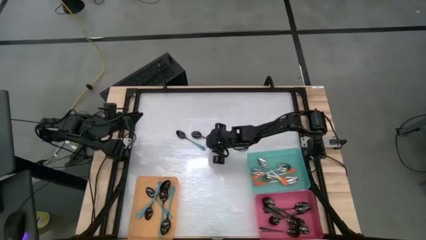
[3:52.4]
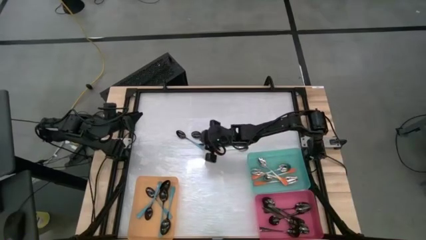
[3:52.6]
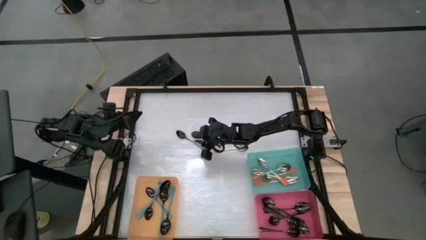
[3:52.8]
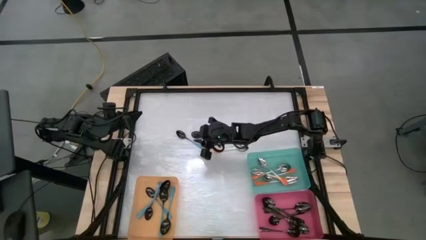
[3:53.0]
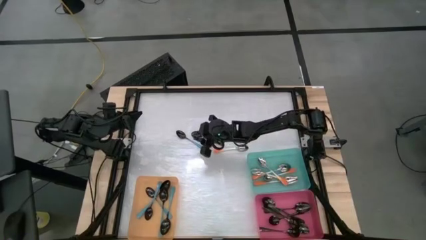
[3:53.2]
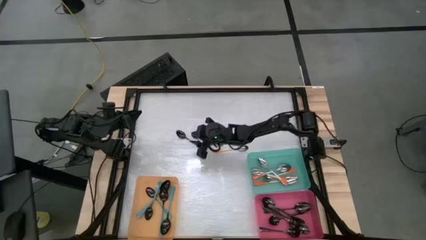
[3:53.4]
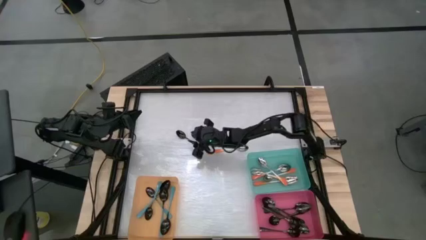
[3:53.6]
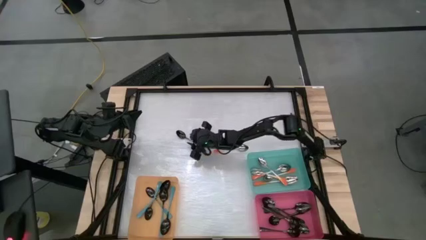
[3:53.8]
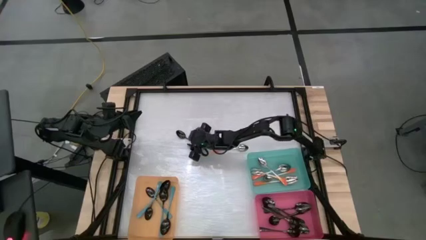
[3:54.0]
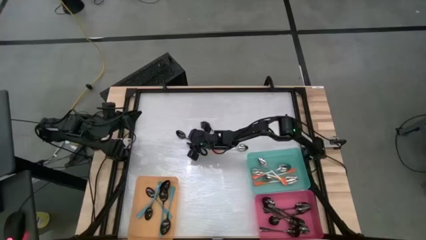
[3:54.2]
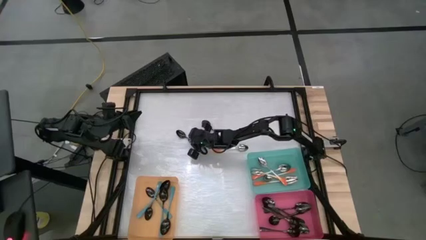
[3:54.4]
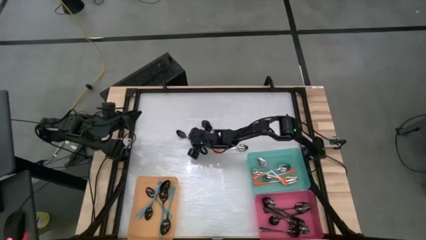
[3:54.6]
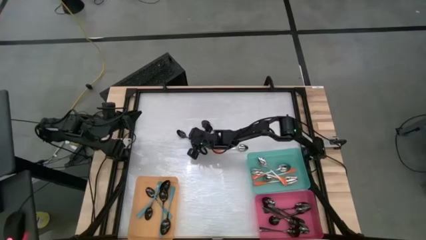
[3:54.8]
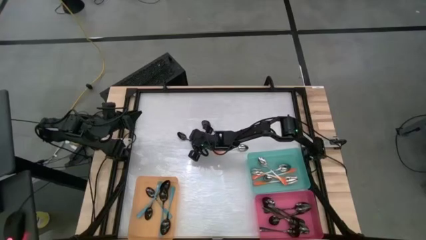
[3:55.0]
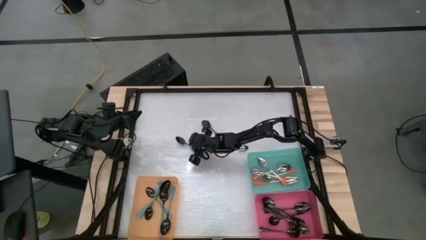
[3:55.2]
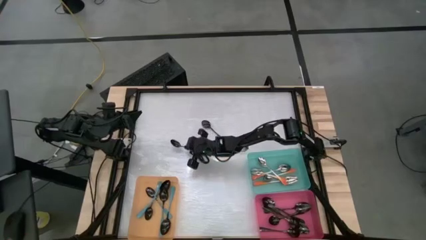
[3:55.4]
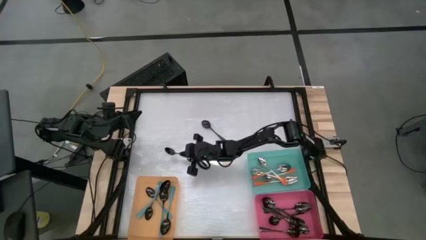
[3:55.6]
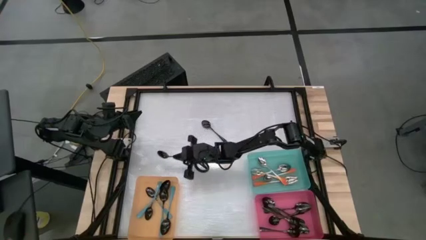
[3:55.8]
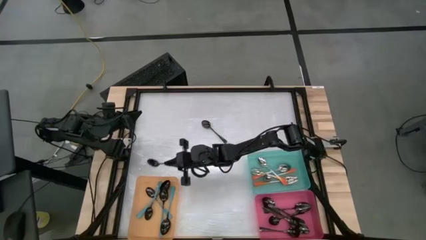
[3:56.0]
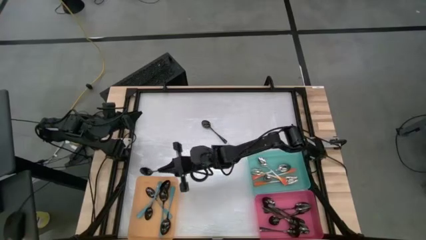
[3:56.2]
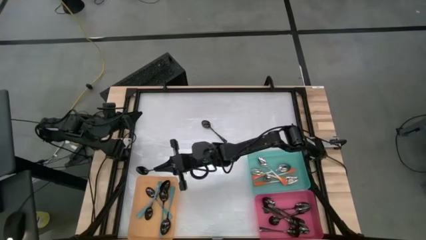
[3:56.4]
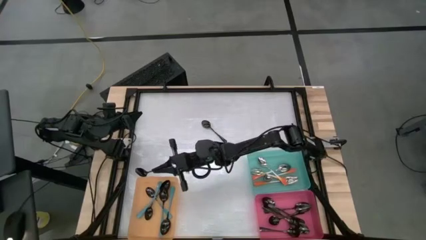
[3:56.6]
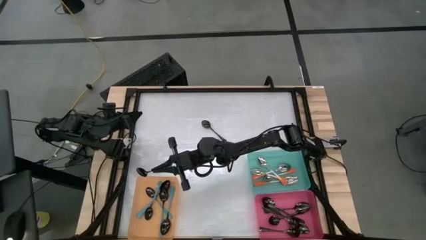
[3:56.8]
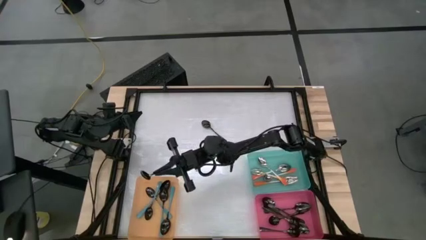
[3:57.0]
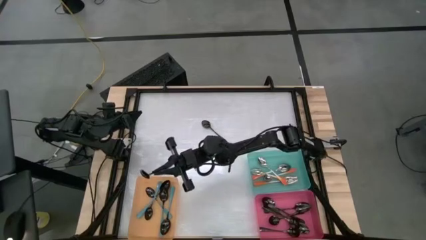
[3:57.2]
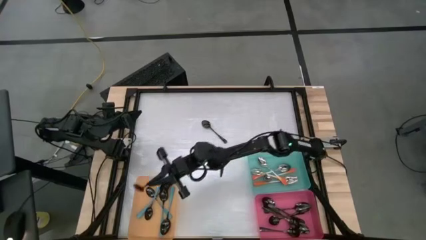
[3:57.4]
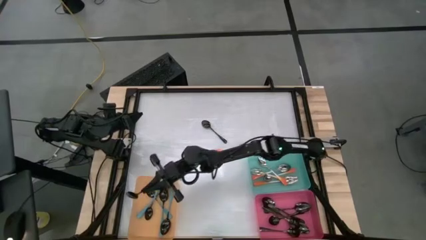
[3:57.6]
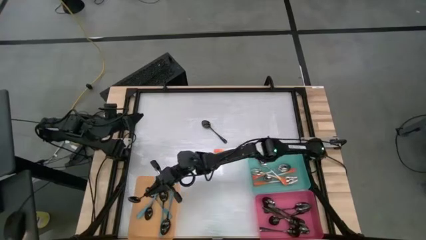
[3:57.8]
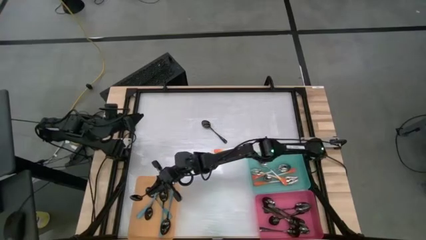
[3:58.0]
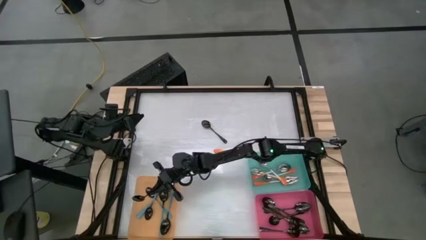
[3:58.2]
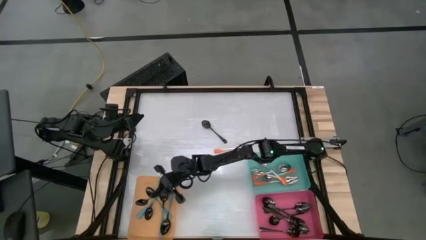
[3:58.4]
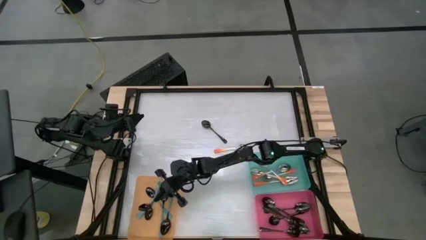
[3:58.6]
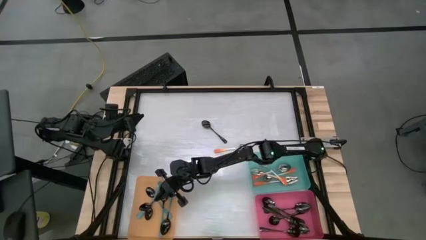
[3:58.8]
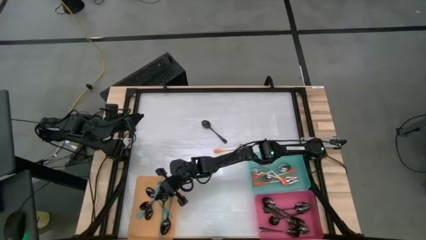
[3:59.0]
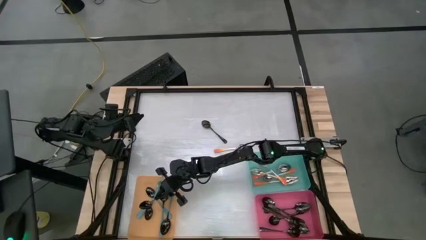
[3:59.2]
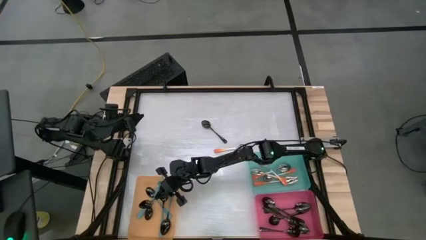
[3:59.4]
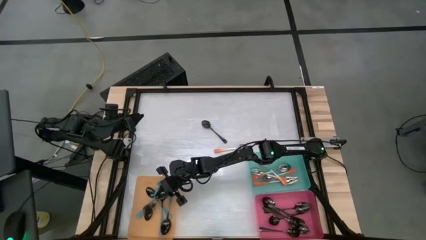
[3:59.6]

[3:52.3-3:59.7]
Task: Sort silverware by color (type)
Put the blue spoon into the orange bin

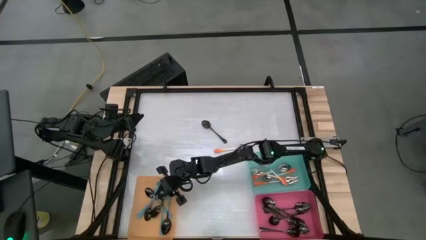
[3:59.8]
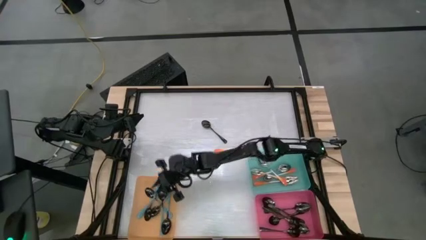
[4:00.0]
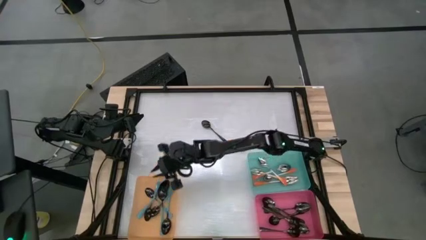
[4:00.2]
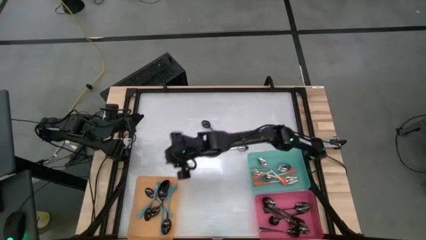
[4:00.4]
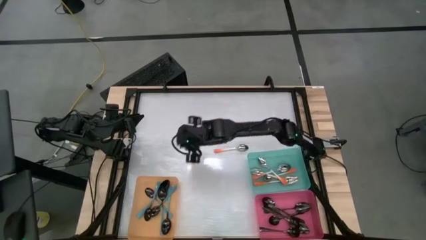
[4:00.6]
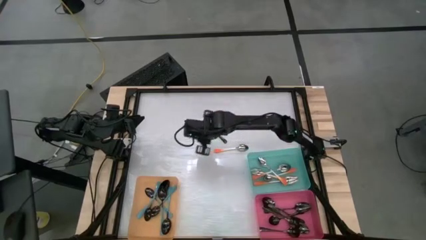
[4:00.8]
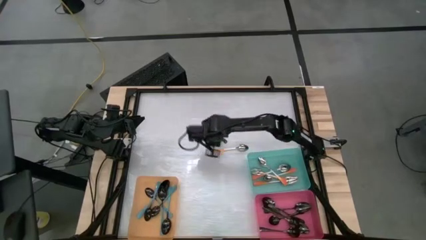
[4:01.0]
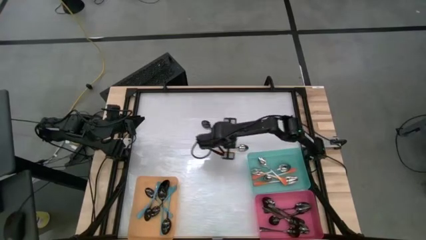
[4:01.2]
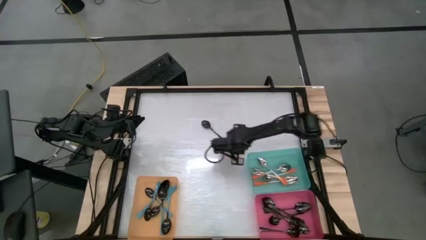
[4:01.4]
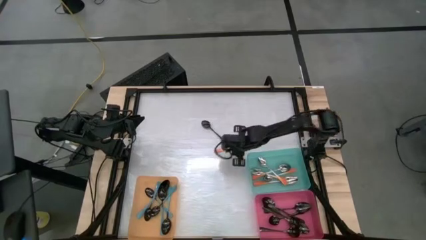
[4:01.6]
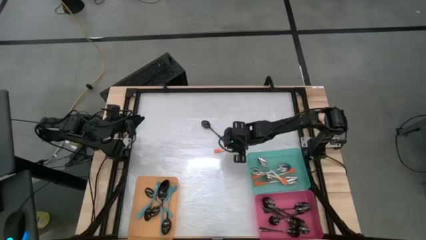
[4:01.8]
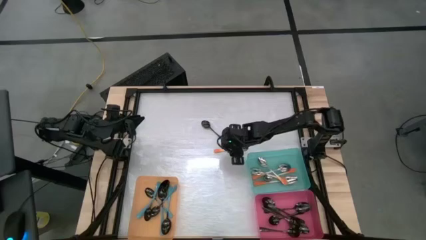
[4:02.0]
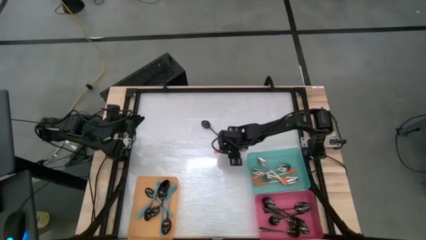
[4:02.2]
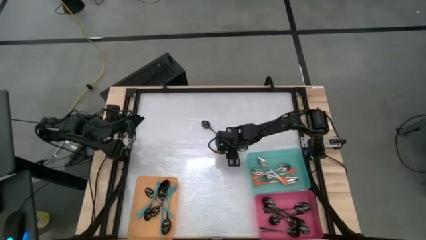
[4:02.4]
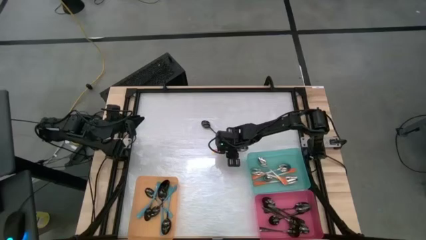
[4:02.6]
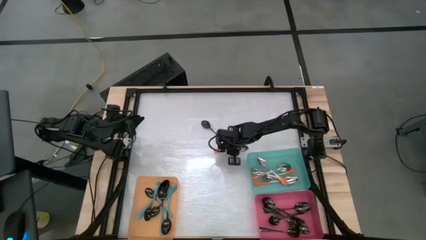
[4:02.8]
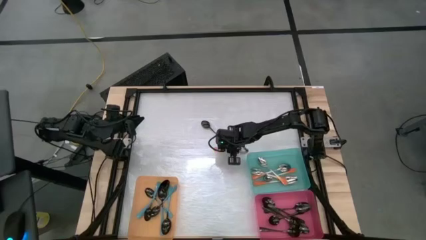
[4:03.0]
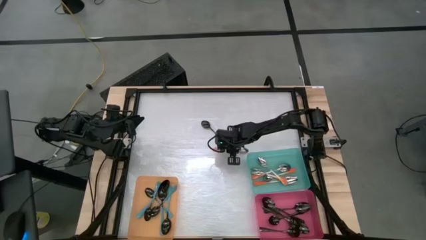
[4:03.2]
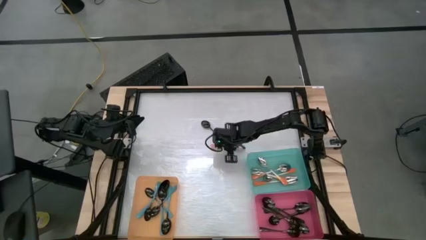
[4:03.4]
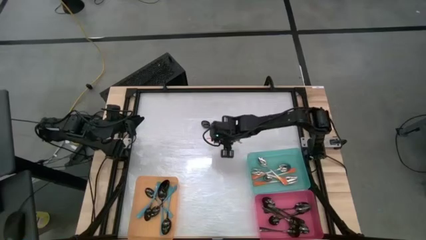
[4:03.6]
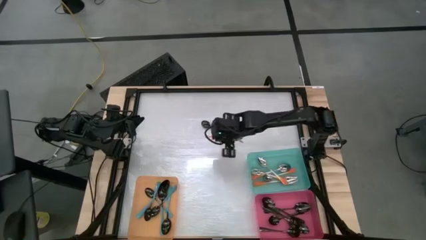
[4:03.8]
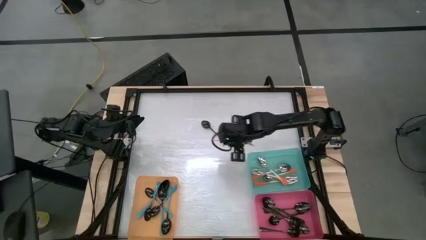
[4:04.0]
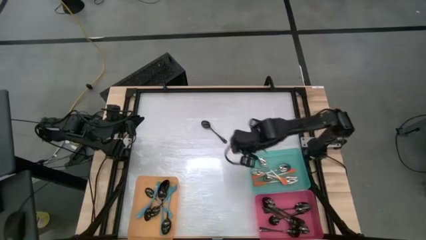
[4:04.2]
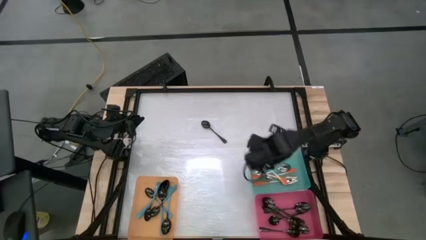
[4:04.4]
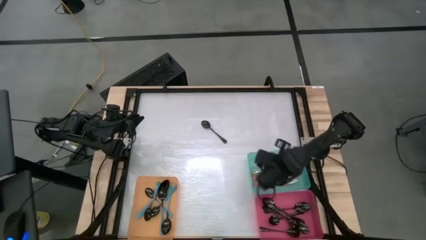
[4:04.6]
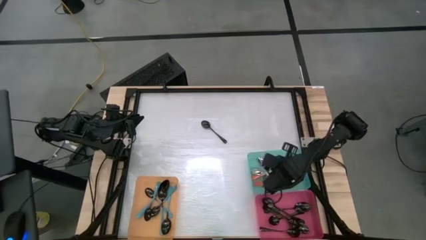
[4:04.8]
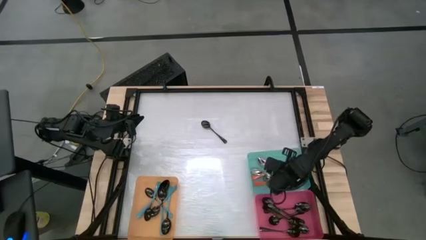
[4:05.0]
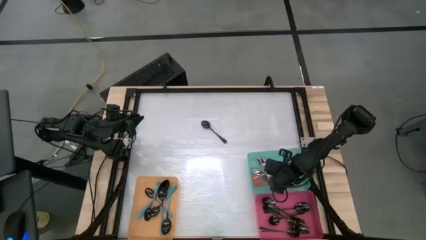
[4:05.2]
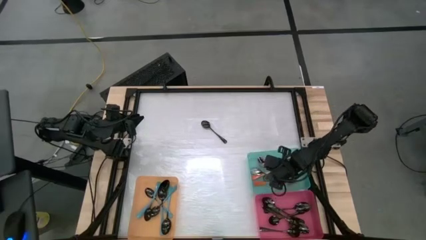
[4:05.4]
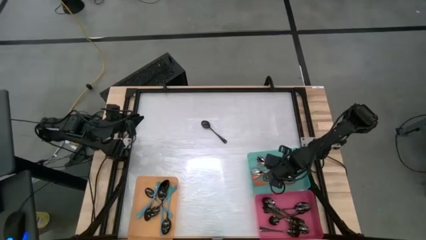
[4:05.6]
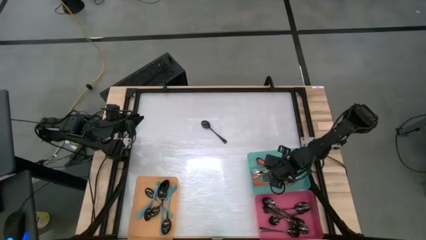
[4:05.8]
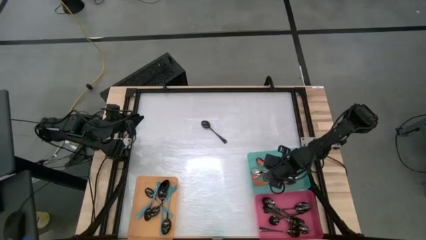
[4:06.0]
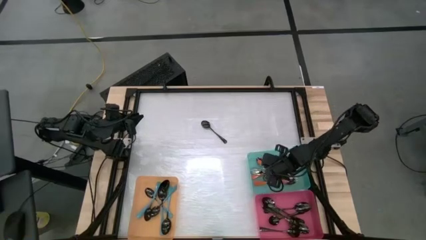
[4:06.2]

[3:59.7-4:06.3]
Put the orange spoon into the blue bin

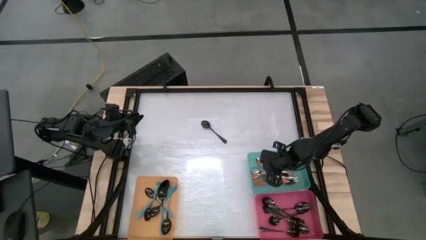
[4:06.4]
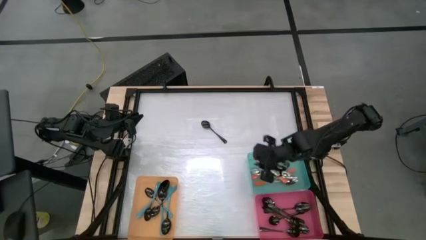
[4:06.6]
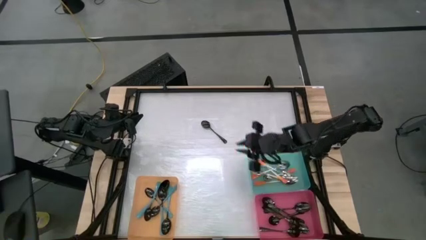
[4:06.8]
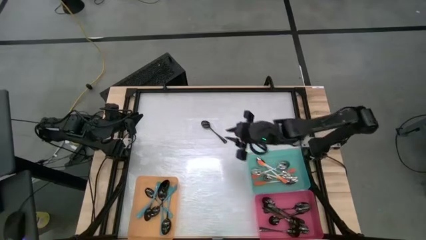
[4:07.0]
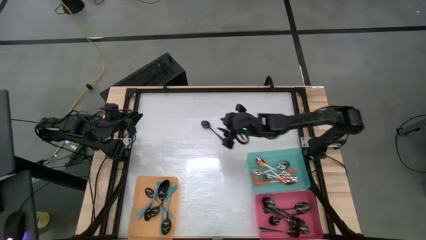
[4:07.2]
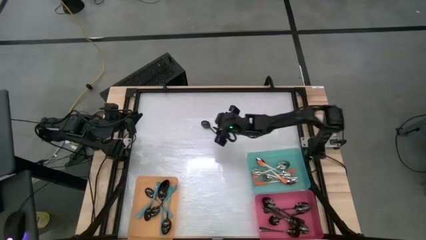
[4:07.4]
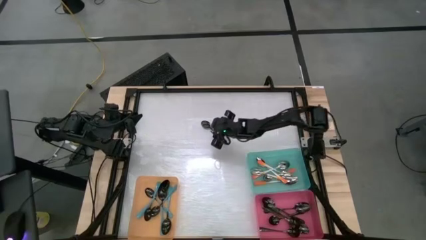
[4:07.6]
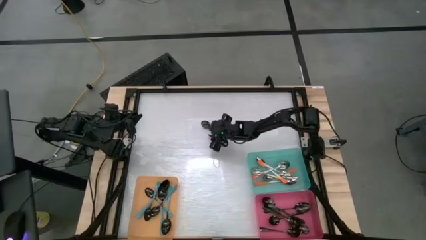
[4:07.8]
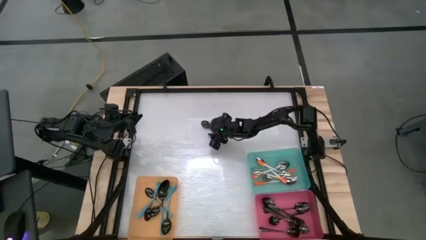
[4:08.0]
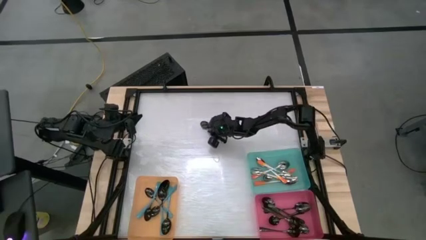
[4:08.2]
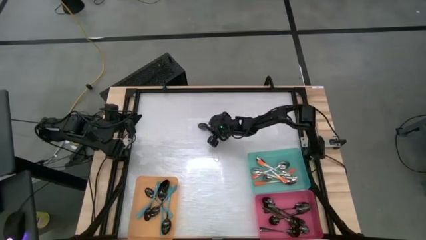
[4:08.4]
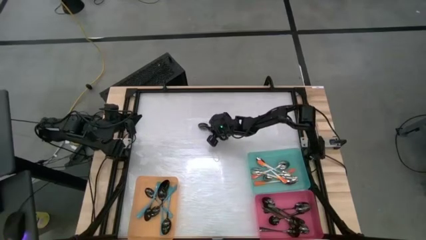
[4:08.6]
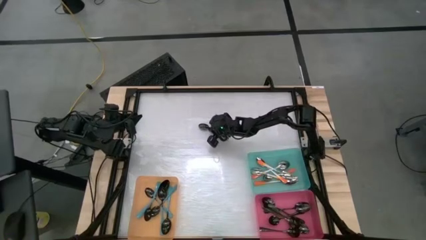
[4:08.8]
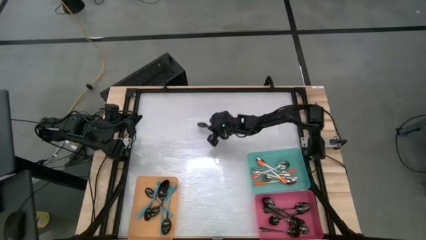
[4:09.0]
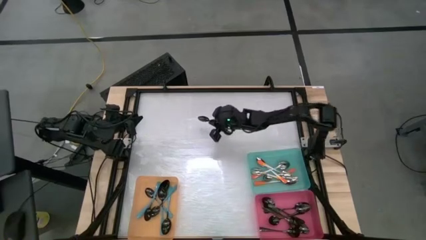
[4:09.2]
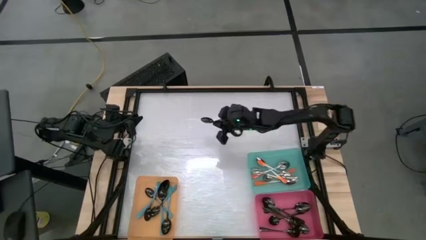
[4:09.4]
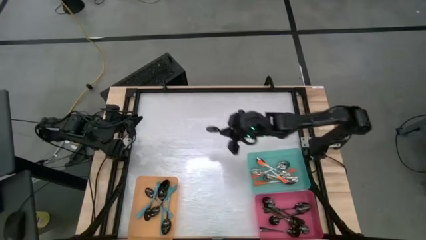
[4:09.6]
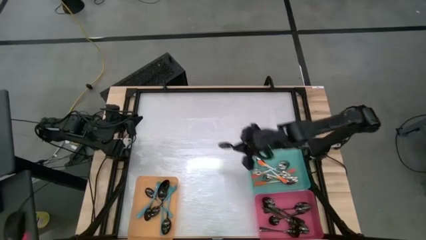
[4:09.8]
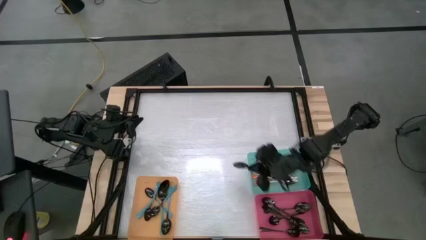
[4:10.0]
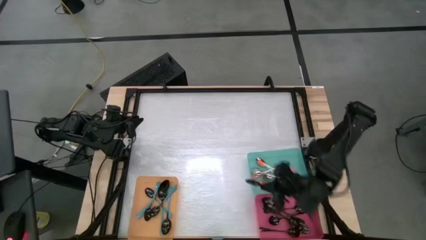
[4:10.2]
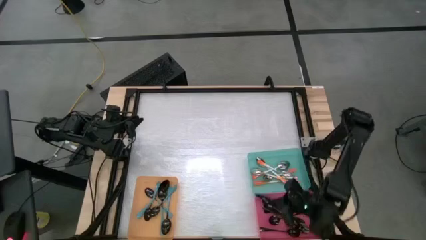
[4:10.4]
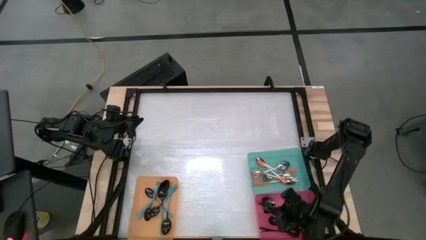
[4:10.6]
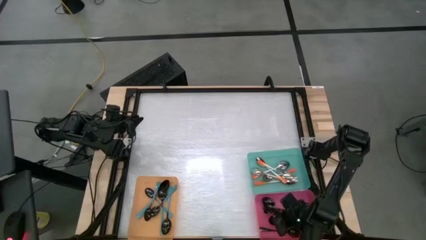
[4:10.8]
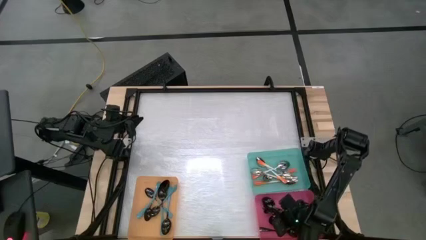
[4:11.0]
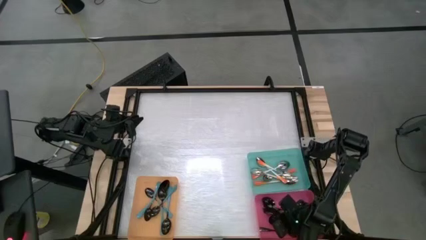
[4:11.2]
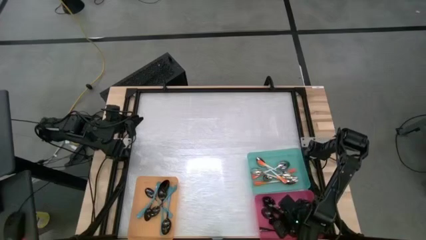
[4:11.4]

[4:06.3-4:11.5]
Put the black spoon into the pink bin
